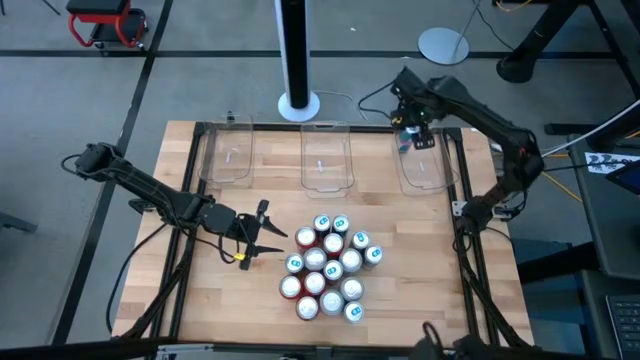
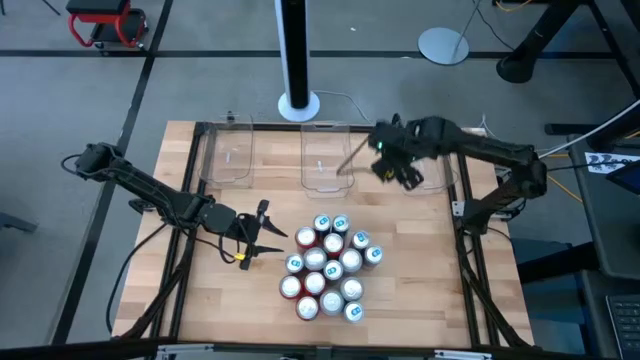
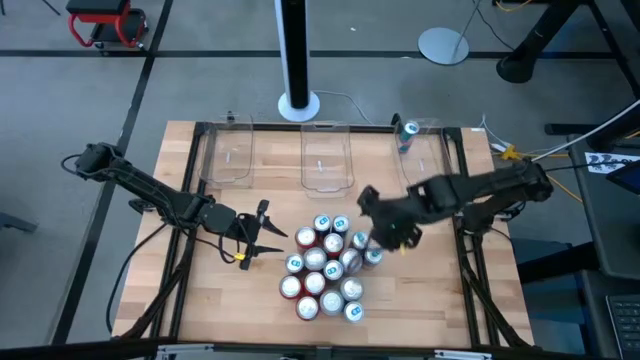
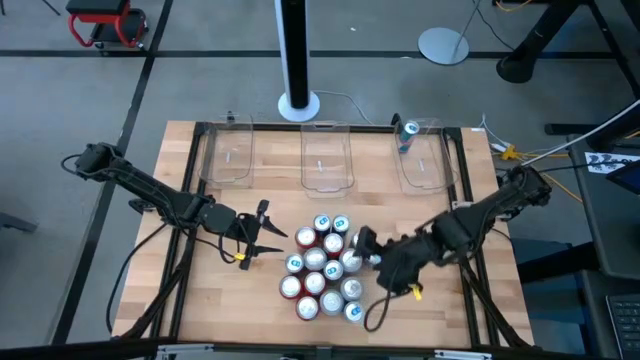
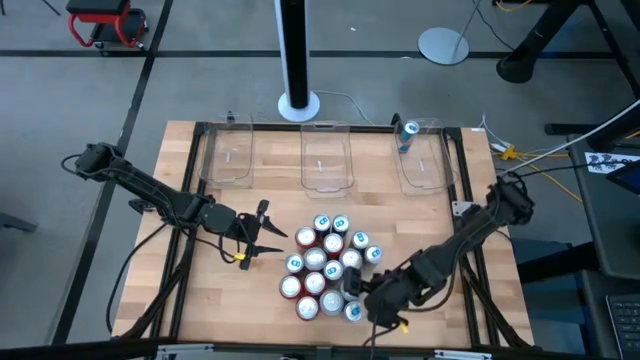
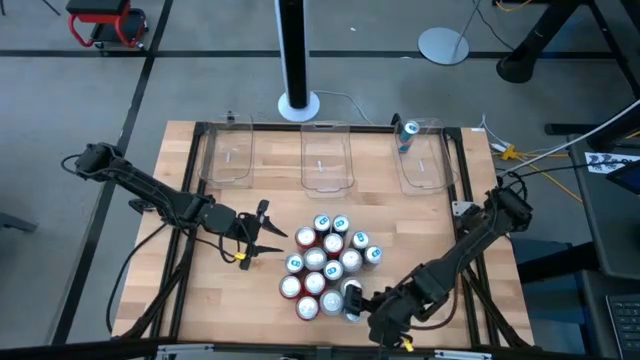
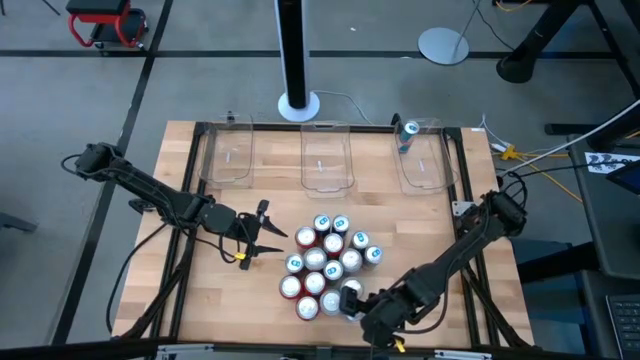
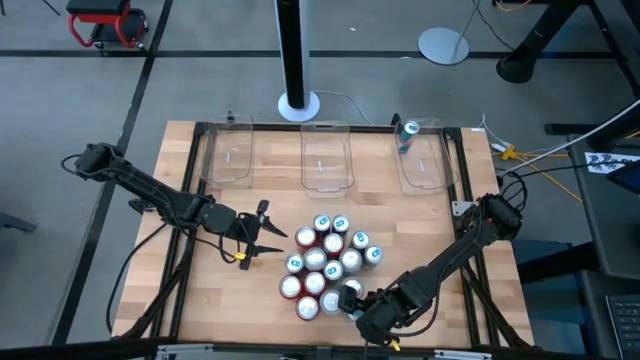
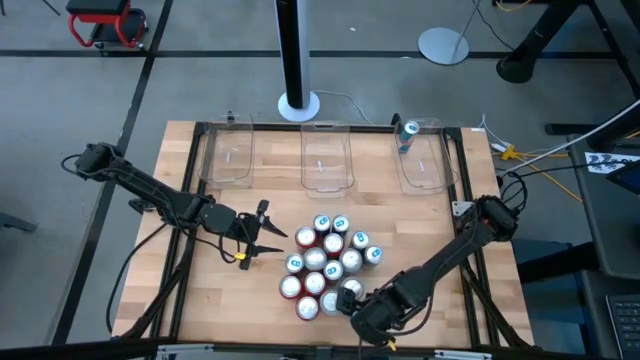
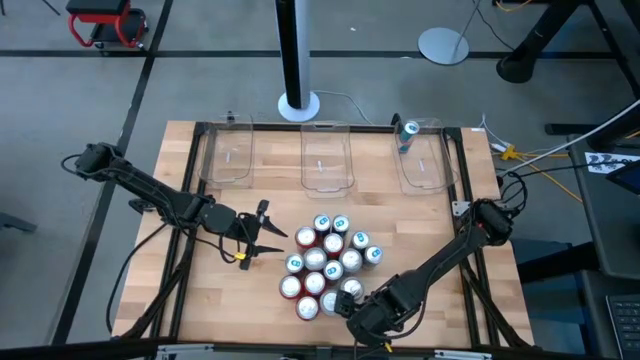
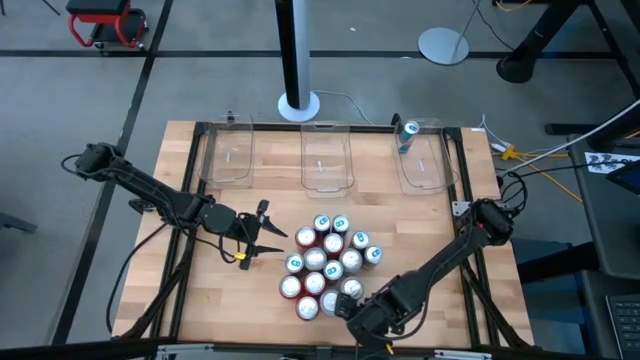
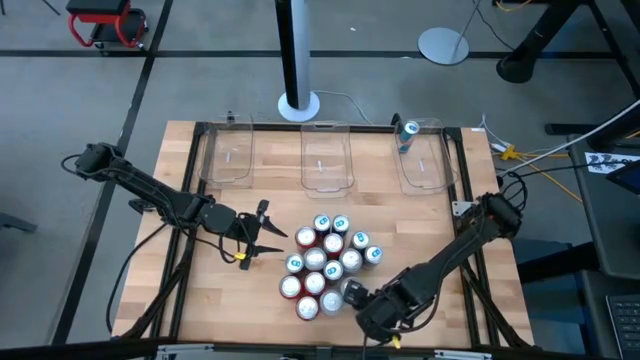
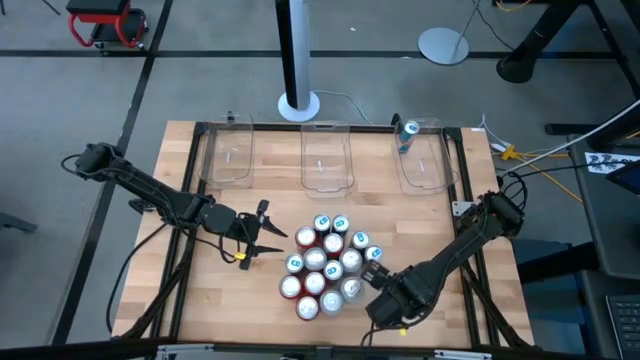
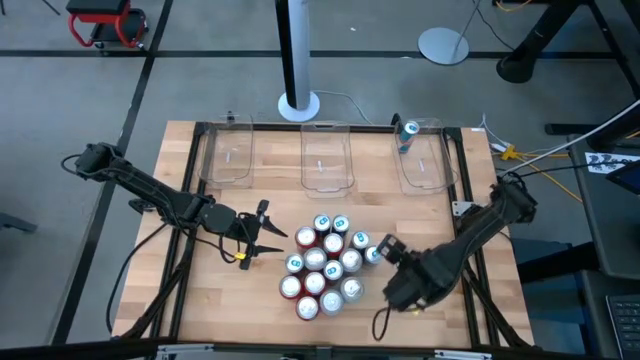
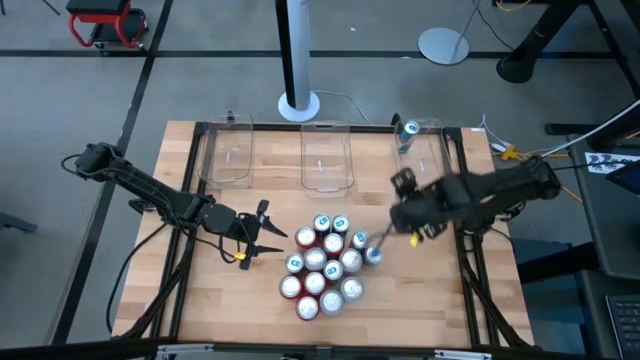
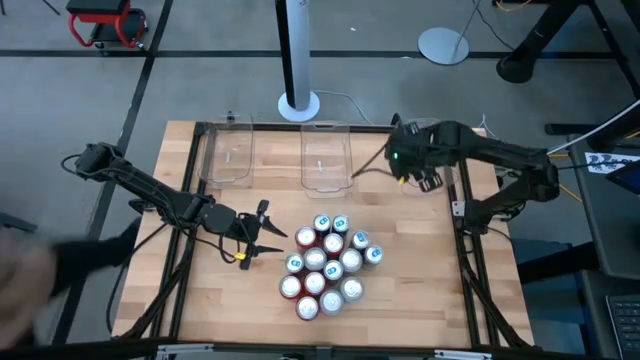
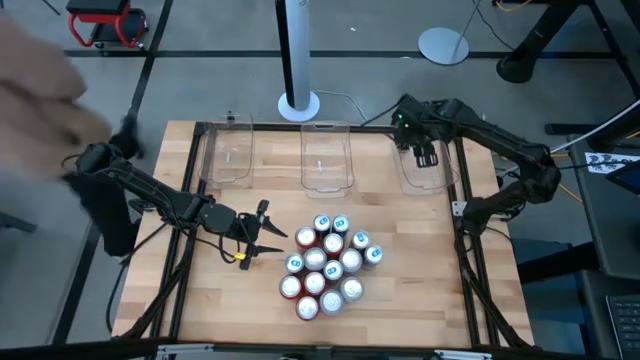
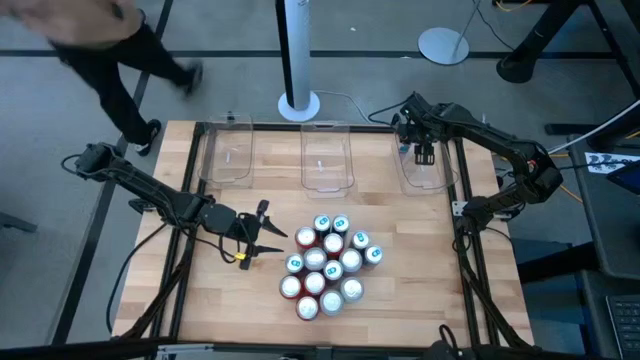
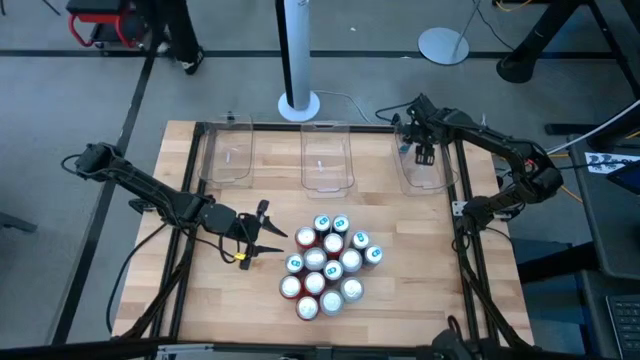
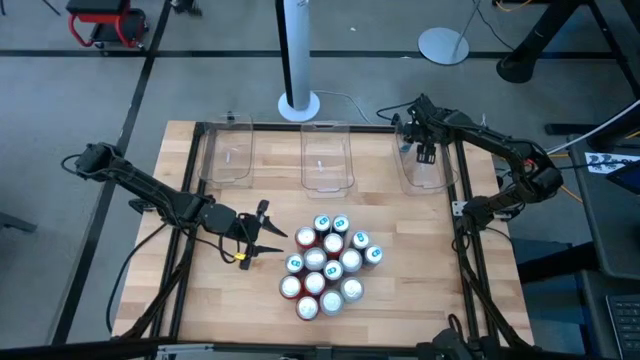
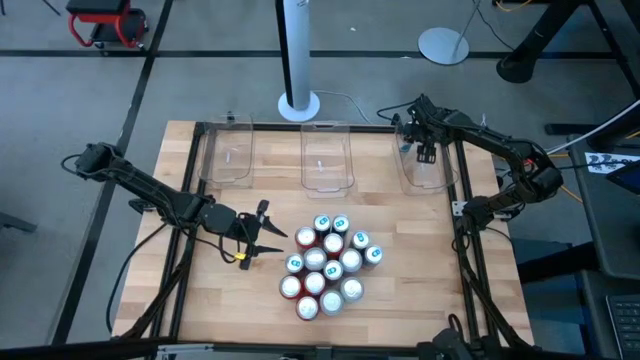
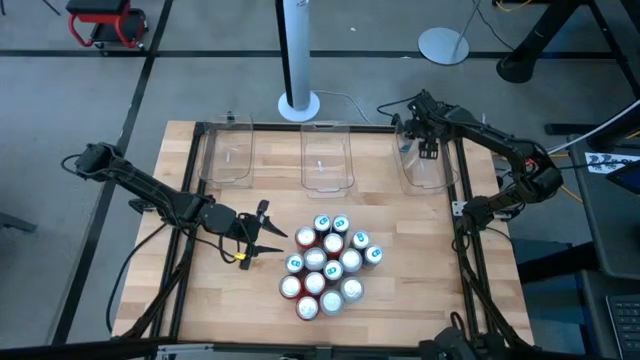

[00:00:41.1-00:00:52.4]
Task: Sort soda cans
Put the blue soda can into the top right transparent bin

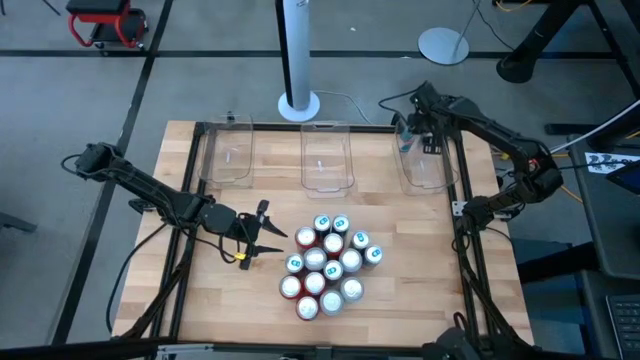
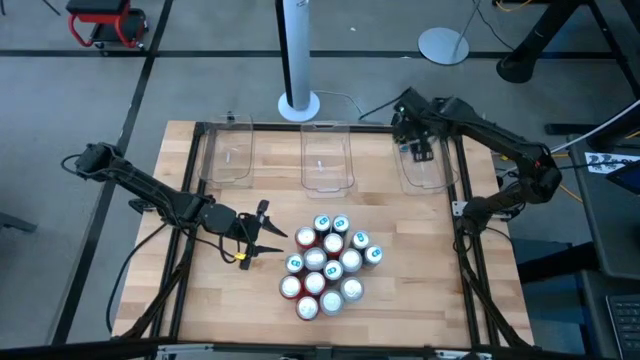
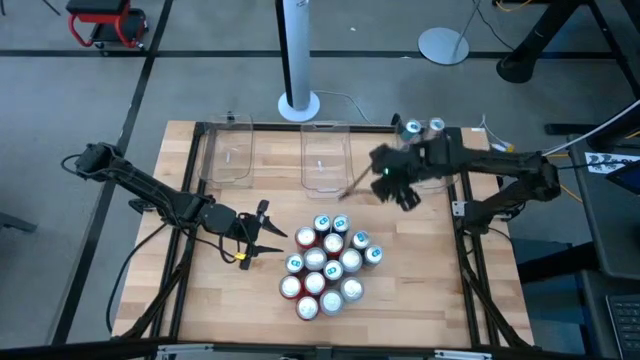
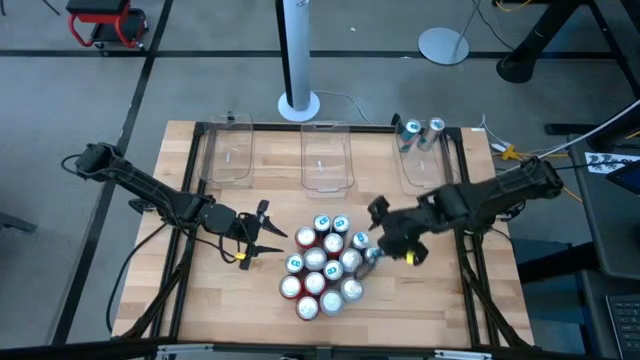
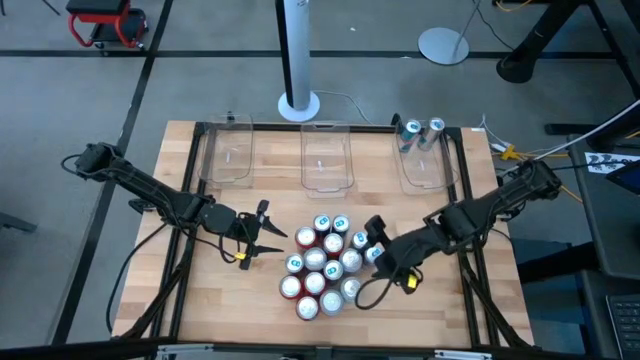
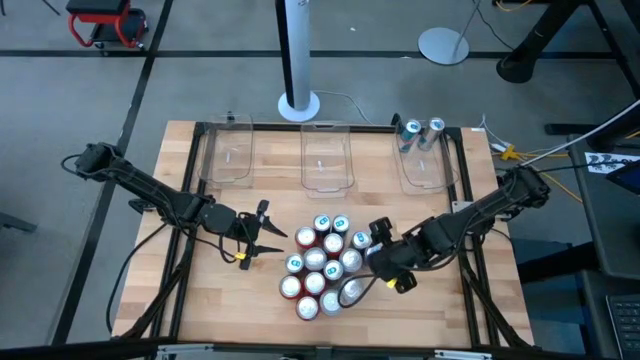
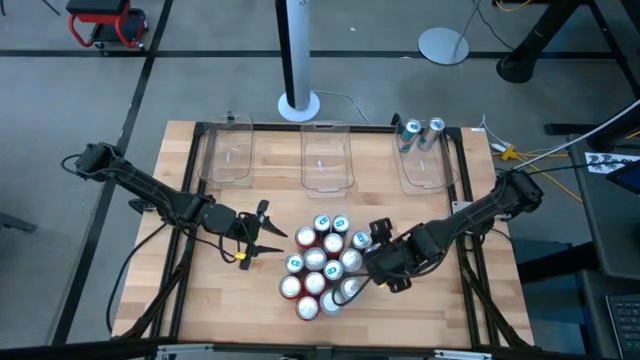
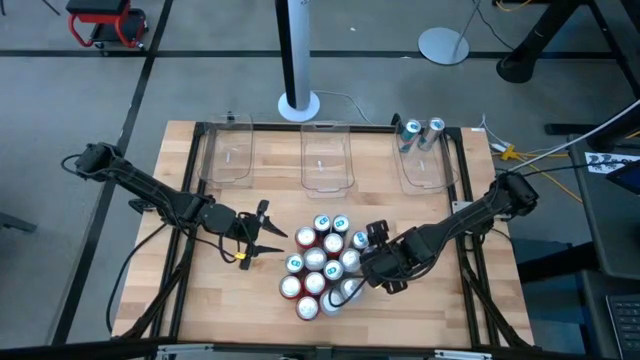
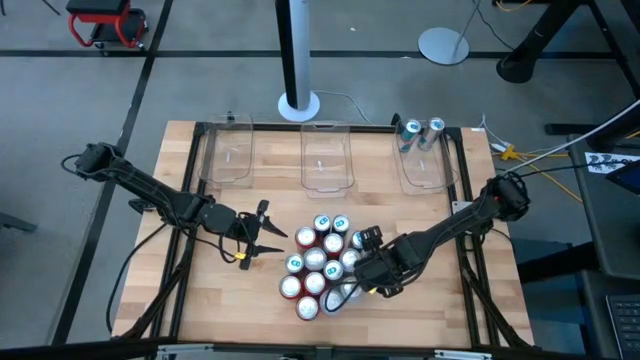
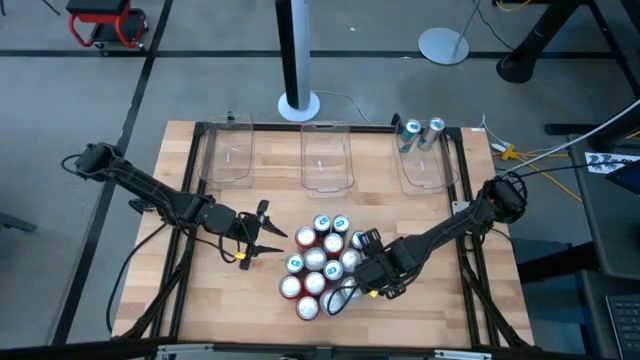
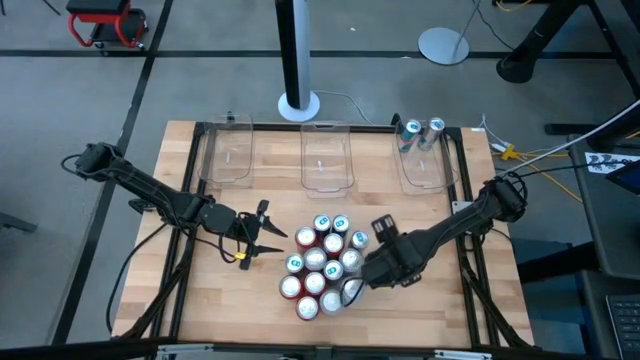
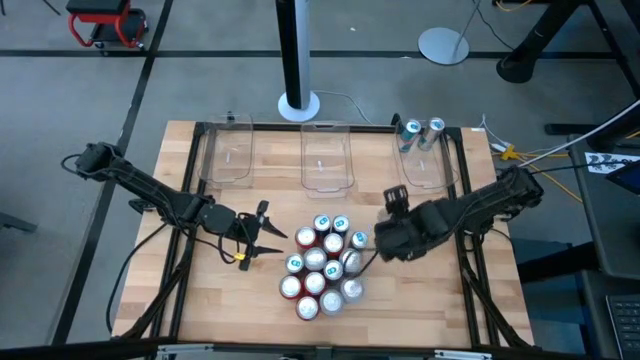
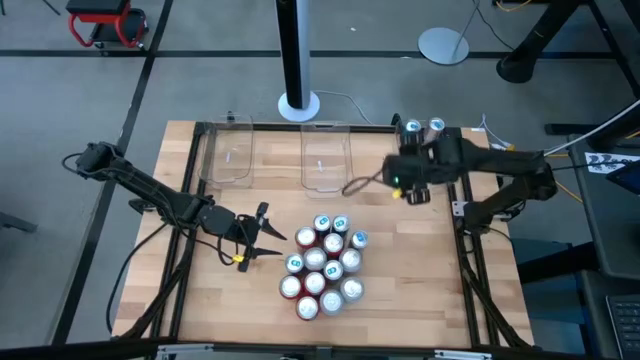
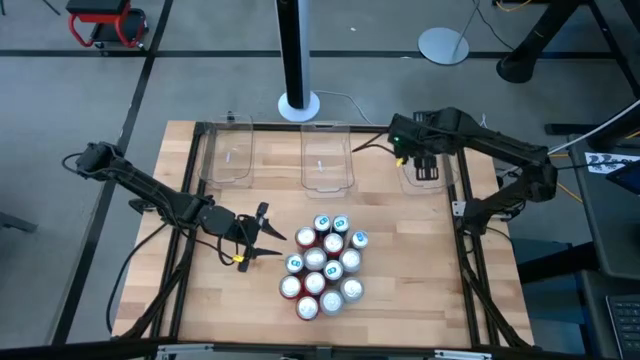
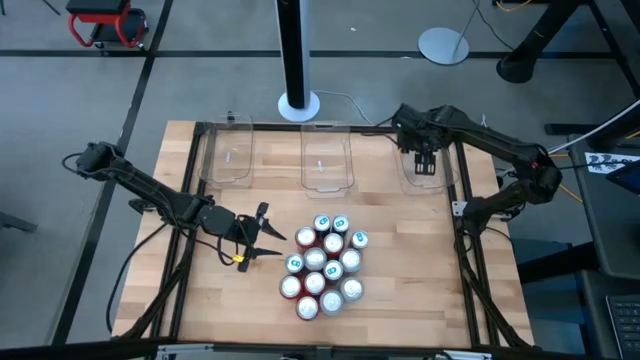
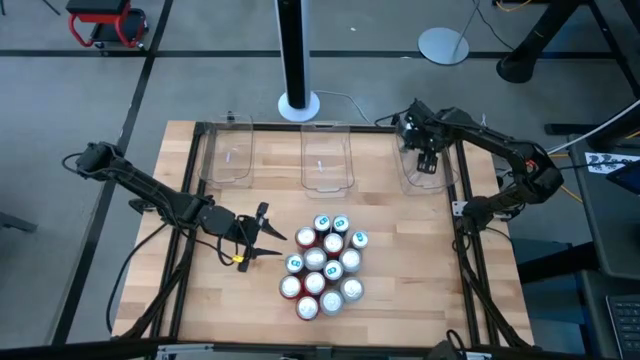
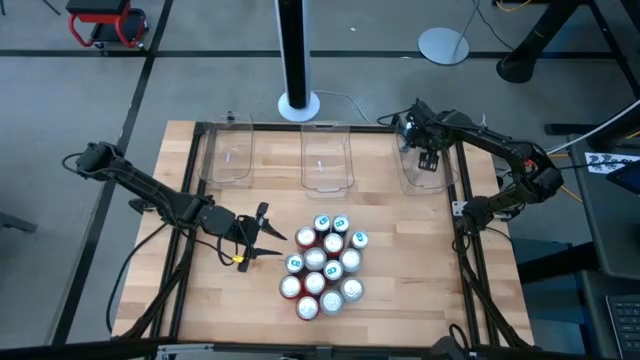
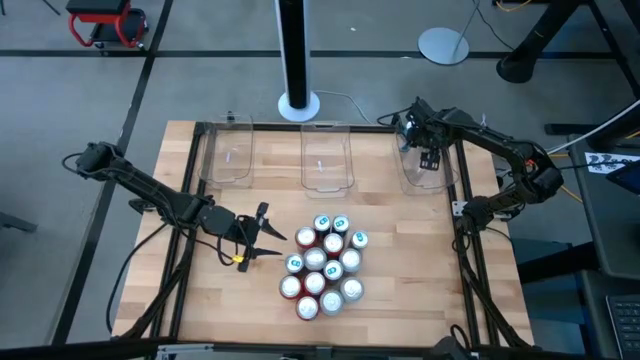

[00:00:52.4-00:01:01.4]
Put the blue soda can into the top right transparent bin

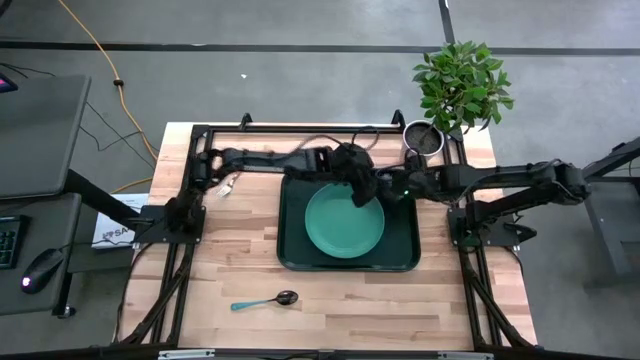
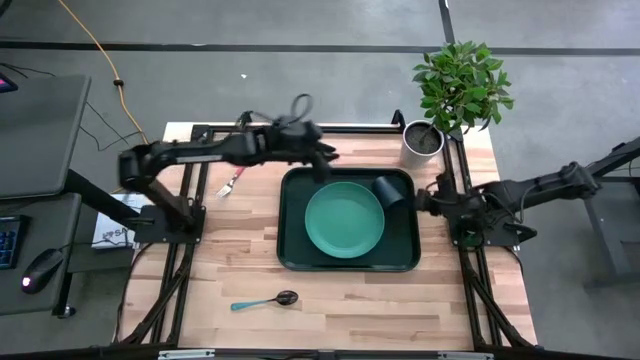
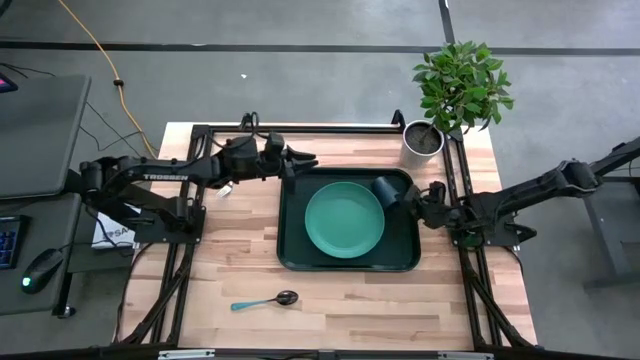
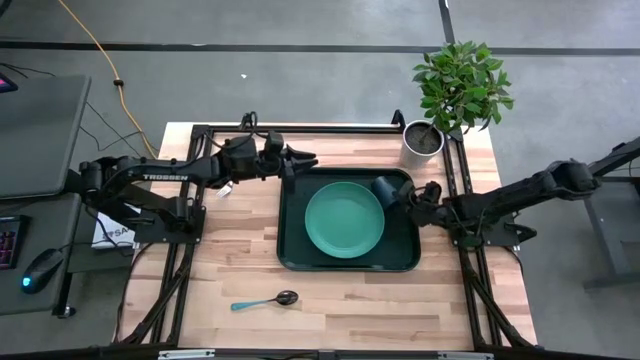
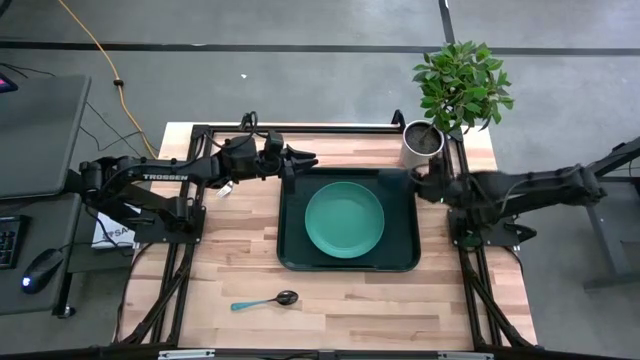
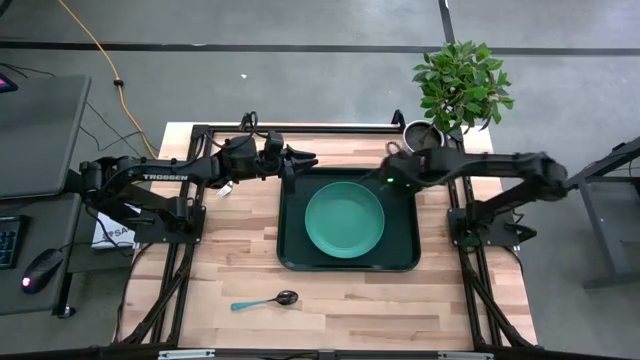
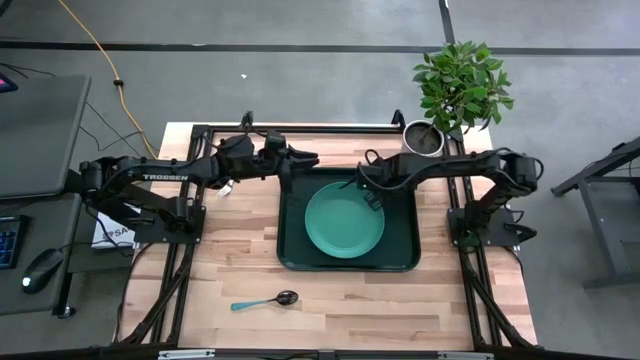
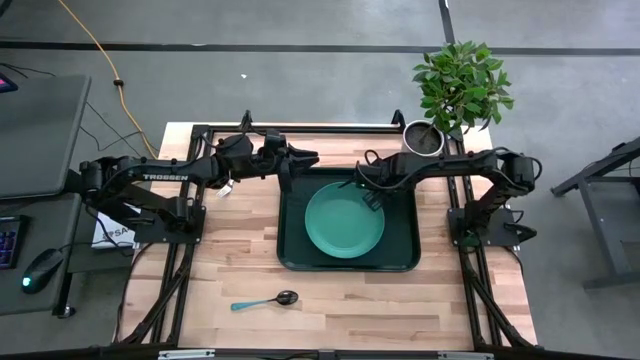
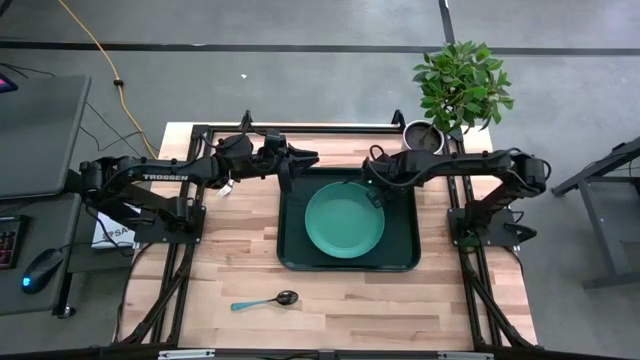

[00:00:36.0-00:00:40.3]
Task: Pick and place plate/cup/fork/spoon on tray
Put the blue cup on the green serving tray
